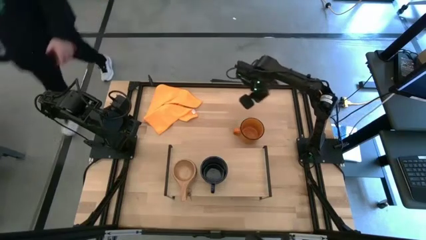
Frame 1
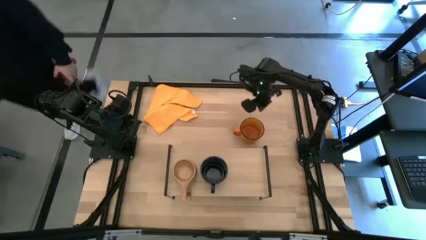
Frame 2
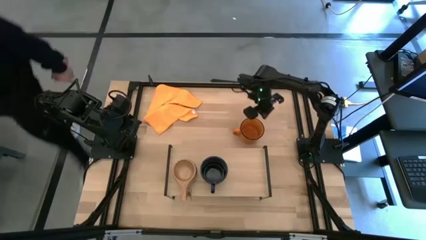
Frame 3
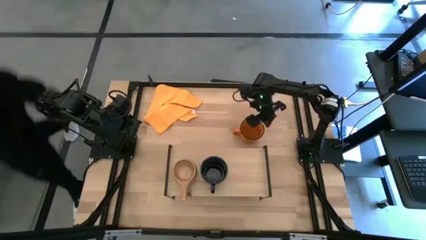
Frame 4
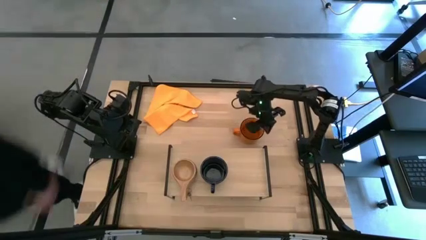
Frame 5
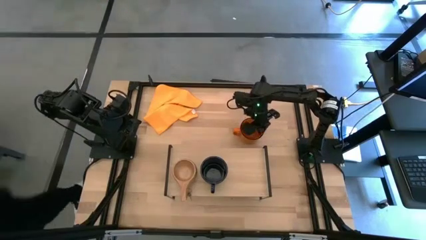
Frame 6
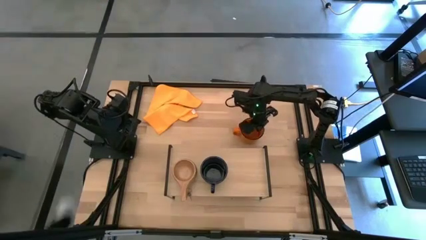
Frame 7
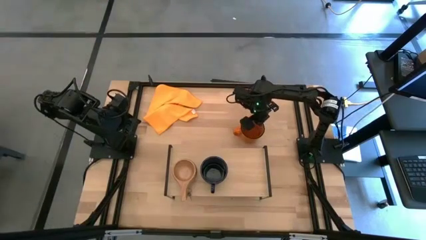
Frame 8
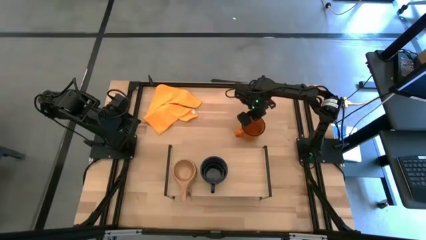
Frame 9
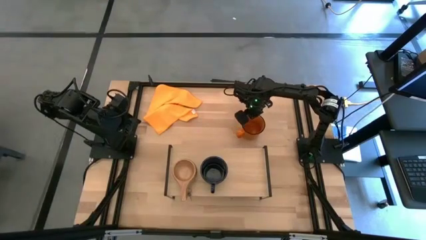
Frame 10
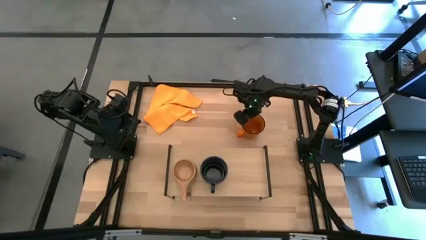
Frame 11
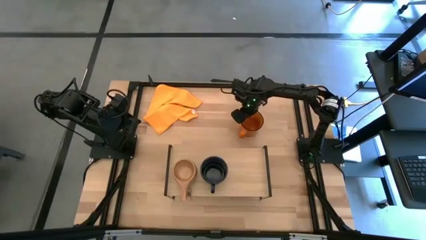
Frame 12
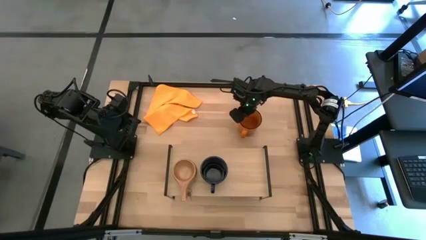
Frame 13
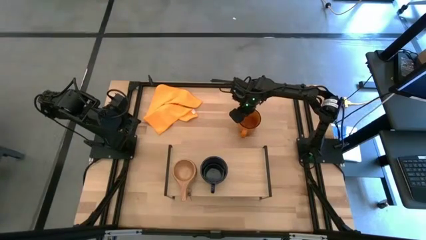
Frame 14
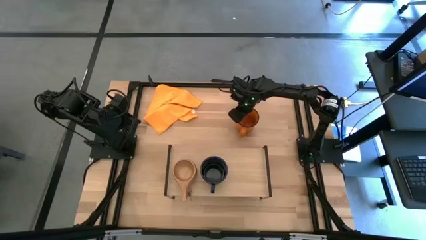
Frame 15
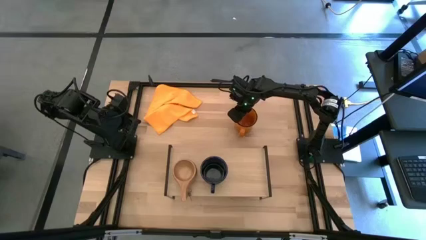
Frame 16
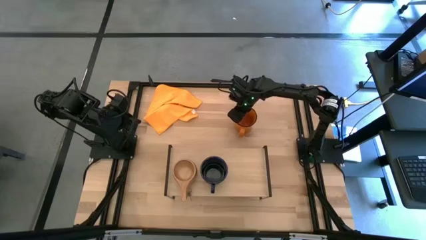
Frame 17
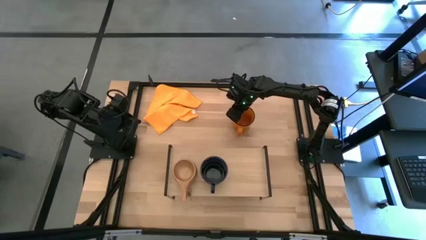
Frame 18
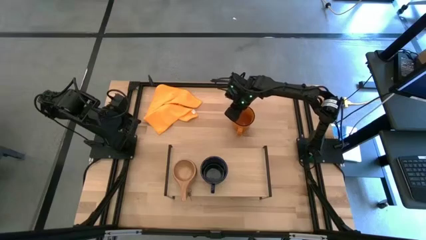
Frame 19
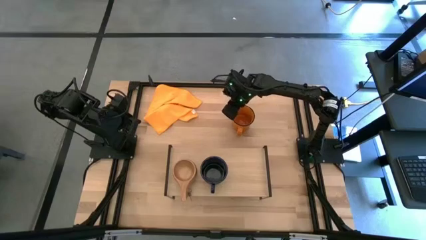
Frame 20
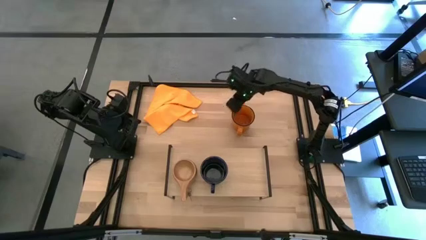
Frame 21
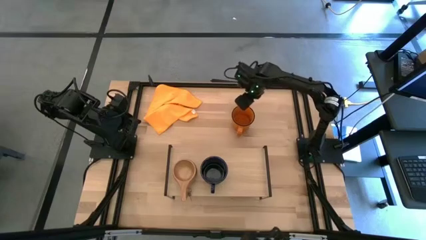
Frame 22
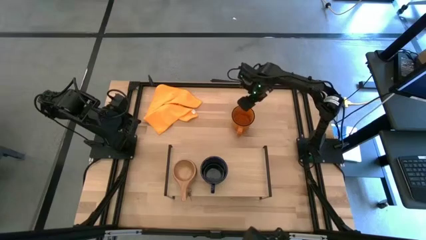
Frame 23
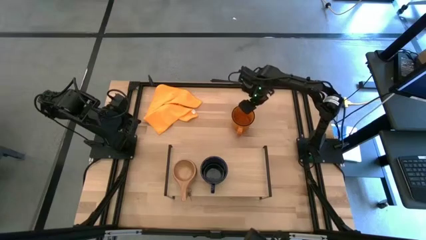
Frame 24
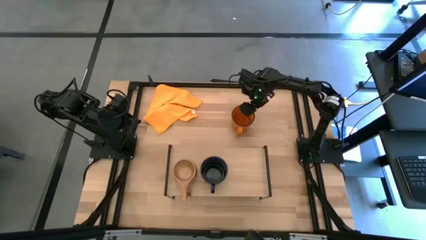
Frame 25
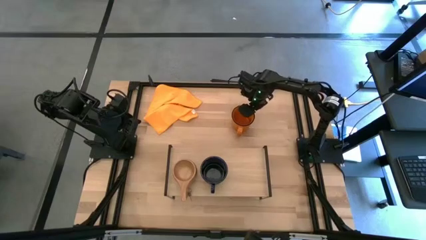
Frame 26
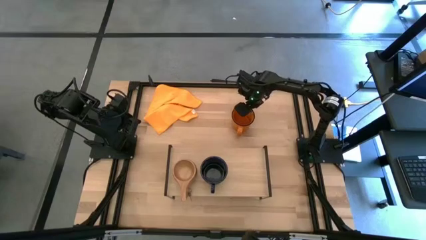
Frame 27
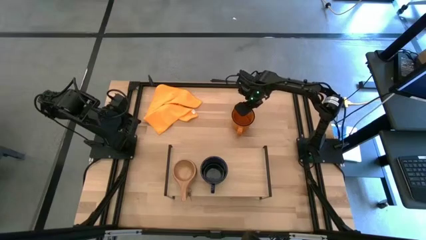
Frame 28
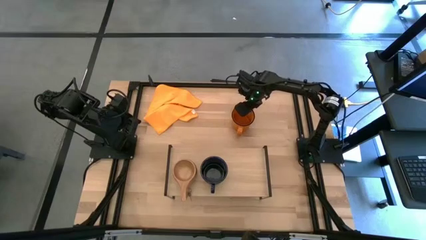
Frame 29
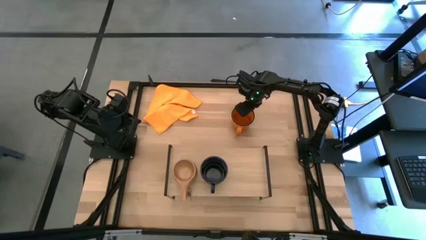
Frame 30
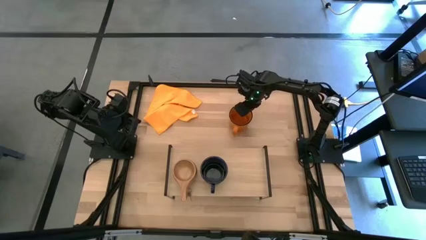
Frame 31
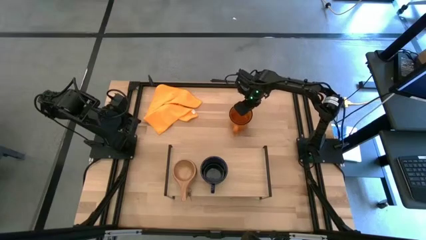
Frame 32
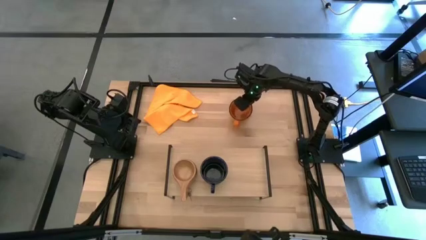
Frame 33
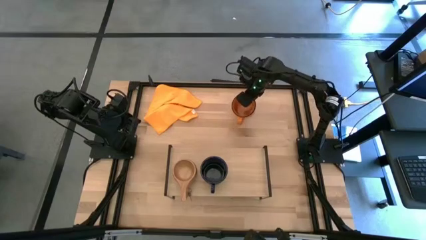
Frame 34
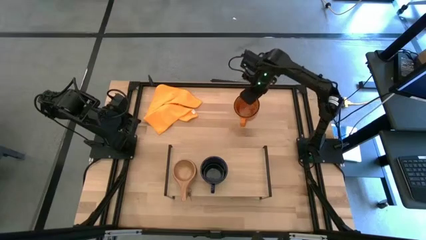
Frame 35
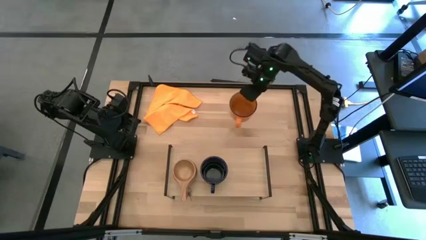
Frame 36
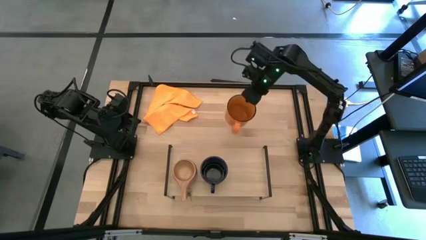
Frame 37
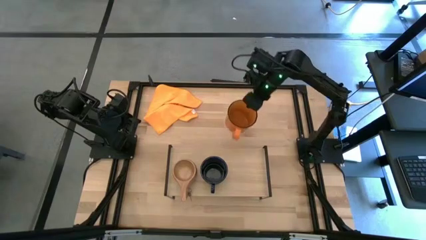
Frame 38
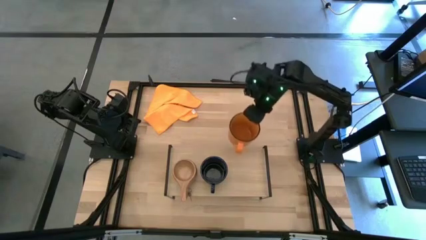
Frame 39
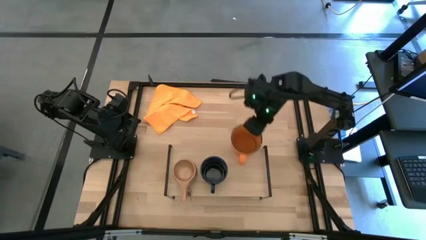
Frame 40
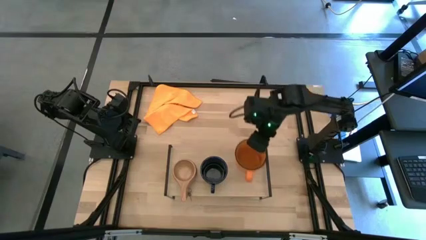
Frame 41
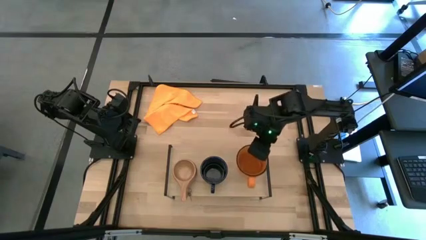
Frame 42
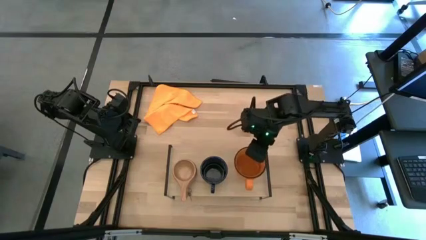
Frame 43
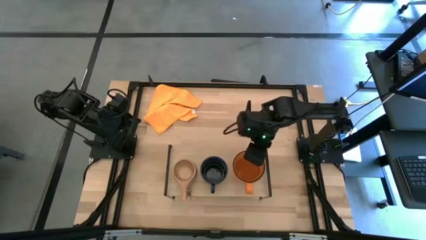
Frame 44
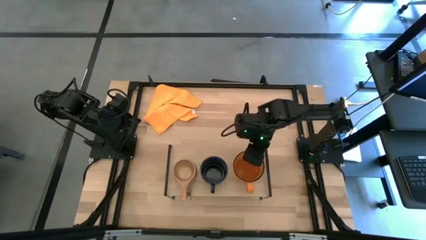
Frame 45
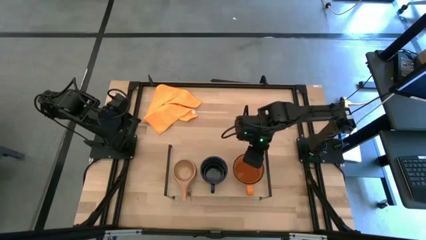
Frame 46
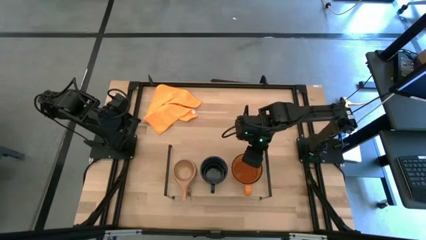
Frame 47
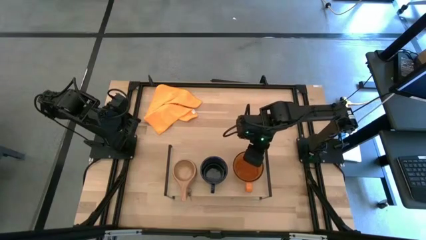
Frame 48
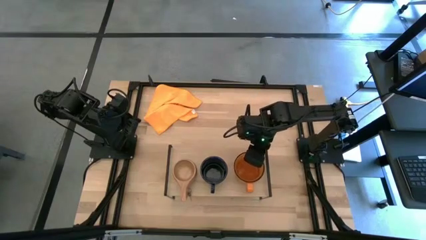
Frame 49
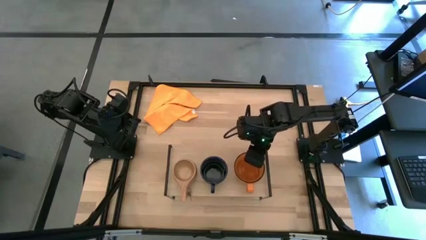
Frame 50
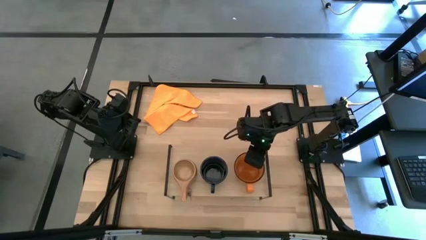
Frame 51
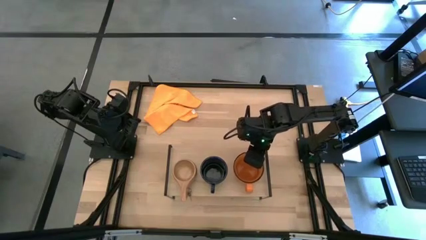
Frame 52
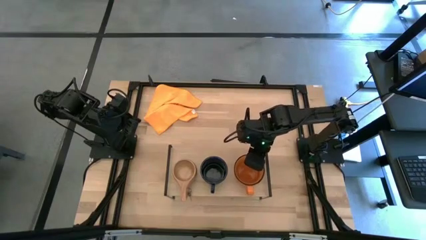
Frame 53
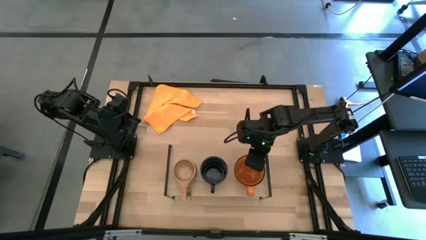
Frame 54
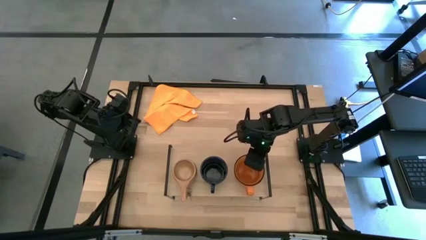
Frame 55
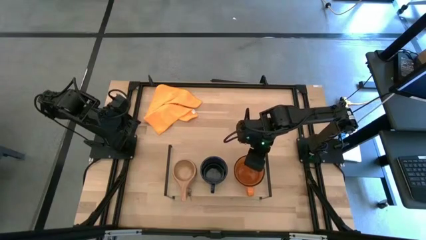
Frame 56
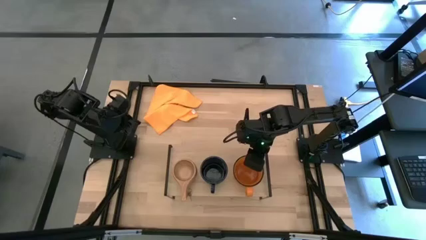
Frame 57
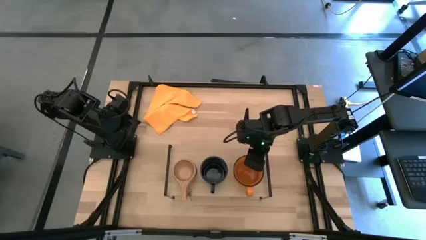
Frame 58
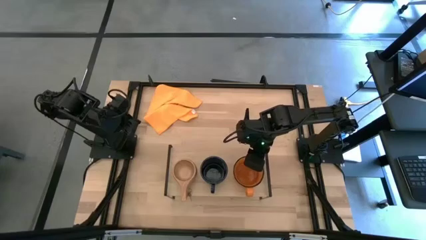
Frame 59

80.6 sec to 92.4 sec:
Task: Stack small to large cups/mugs on shelf
Put the orange mug on the shelf

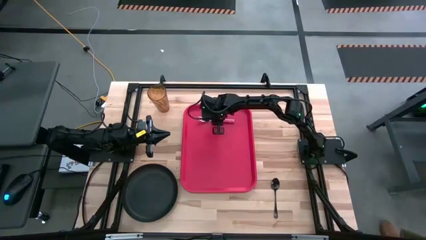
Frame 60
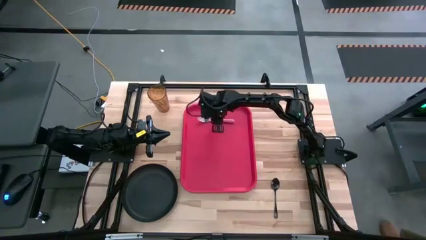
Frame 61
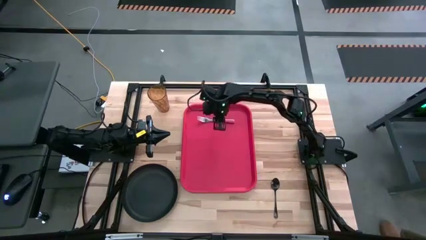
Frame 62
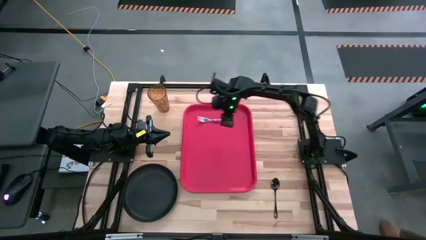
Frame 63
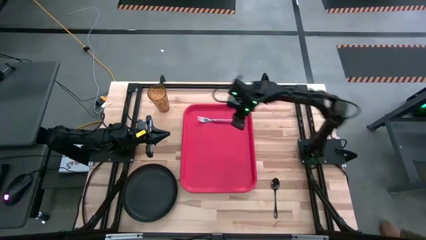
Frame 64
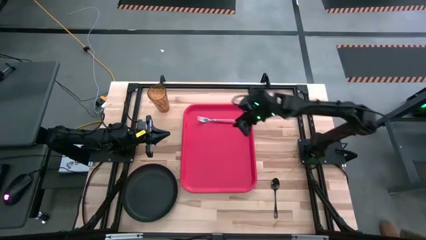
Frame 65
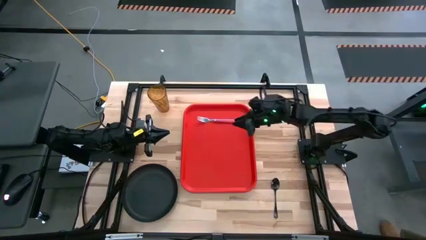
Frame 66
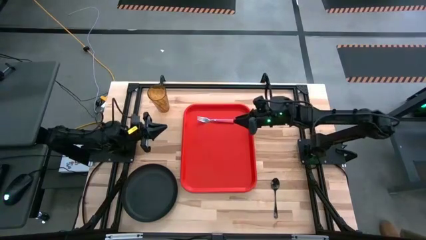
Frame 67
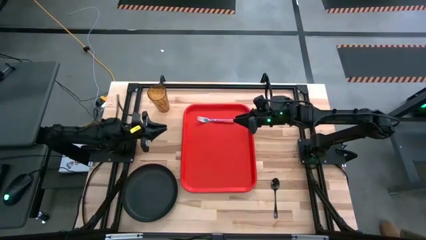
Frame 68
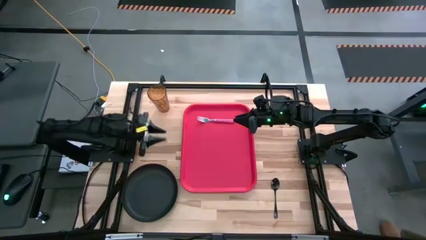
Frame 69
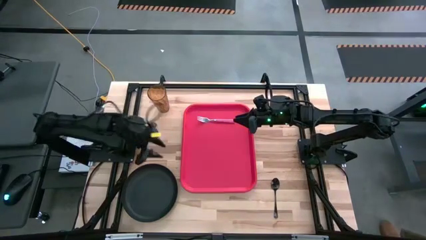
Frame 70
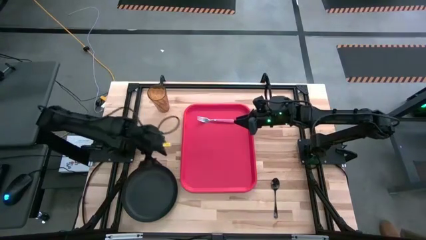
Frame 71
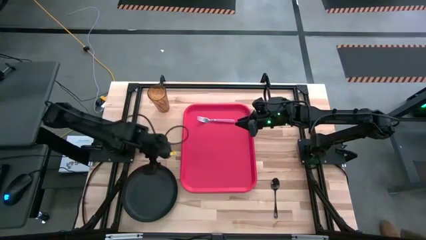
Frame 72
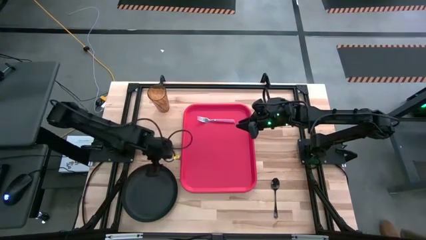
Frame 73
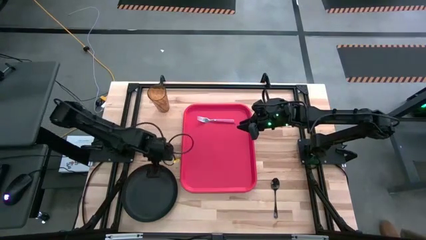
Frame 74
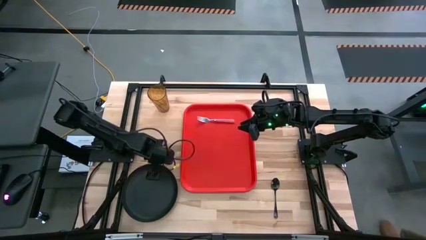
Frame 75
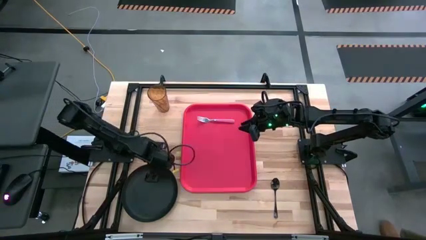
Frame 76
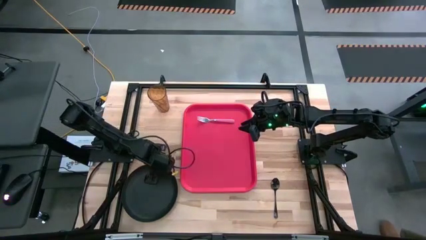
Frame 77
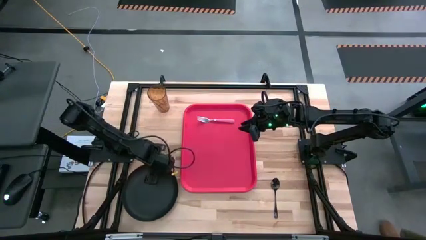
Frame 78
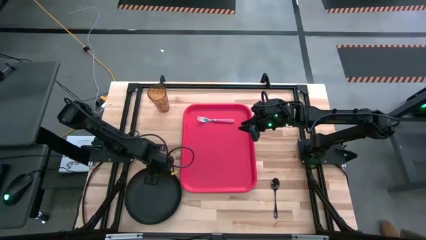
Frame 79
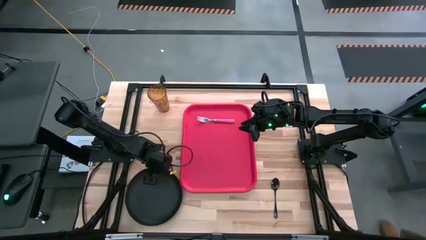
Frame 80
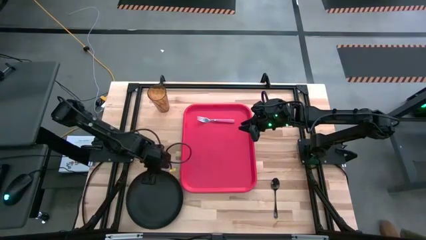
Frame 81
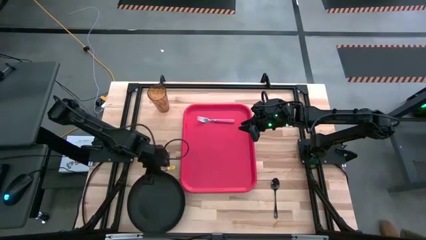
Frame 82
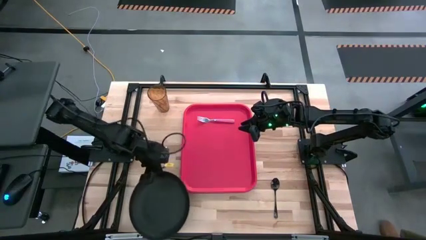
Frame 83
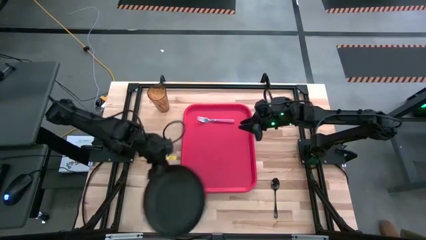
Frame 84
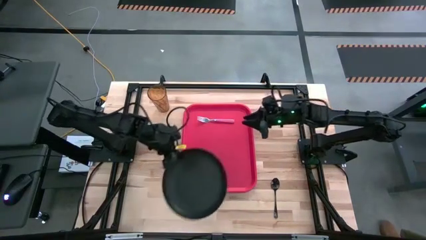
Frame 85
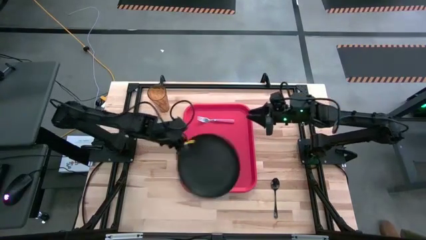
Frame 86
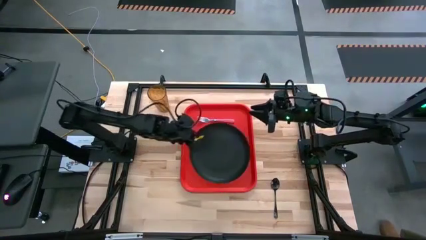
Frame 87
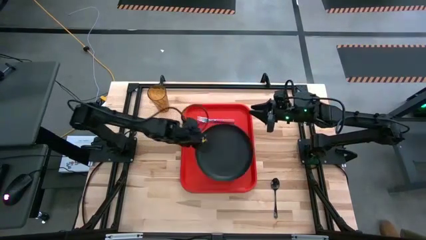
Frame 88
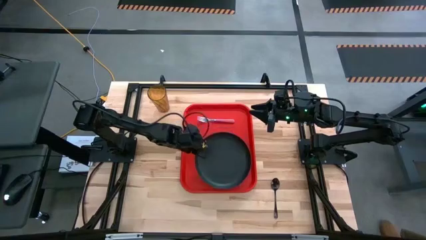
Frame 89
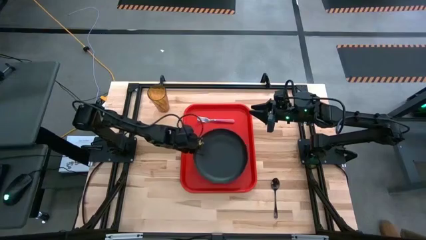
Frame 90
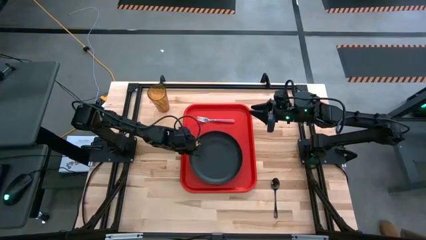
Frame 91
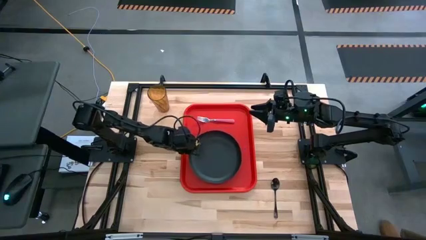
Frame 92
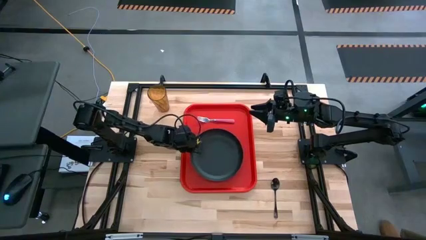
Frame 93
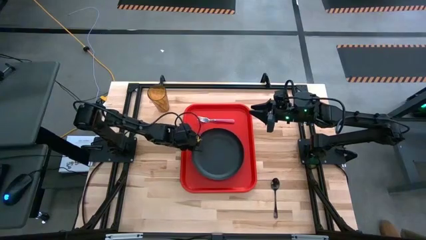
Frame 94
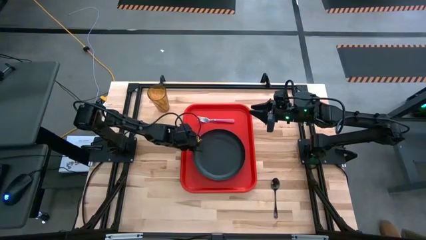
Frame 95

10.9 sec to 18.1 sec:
Task: Pick and place plate/cup/fork/spoon on tray
Put the black plate on the red tray
